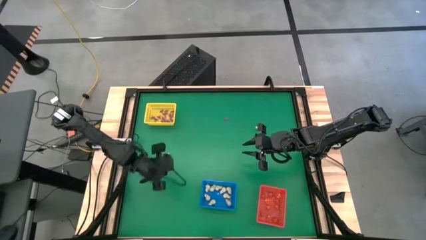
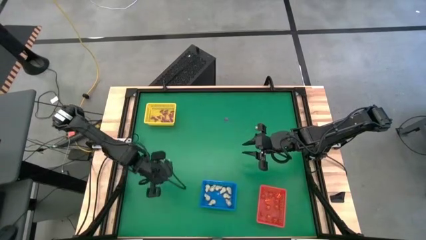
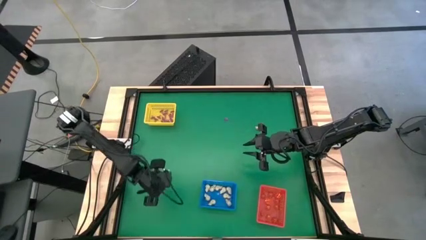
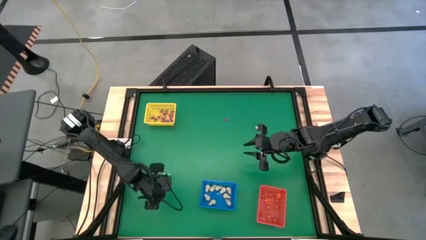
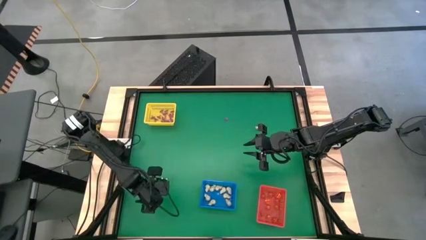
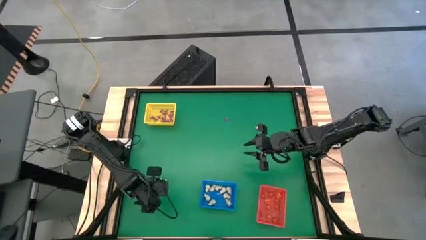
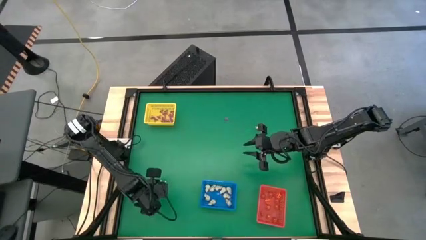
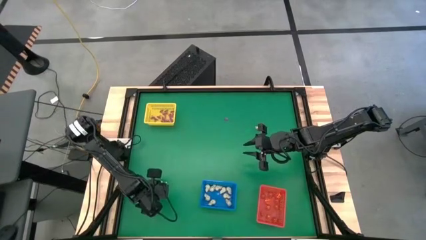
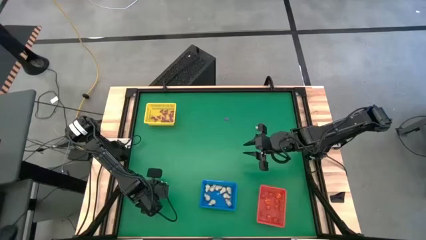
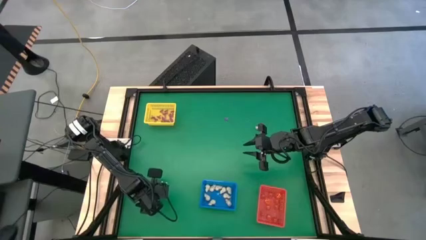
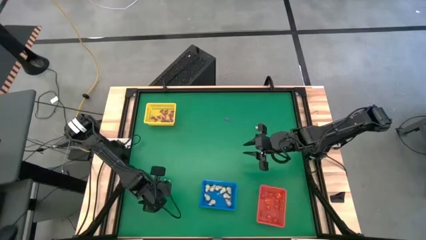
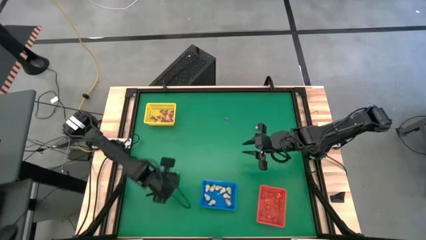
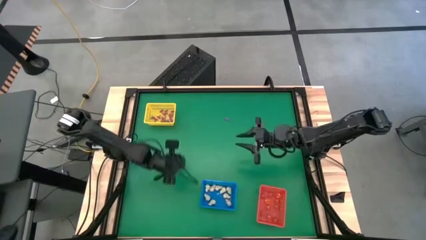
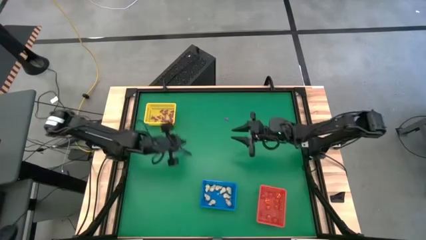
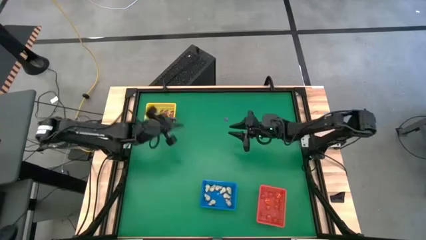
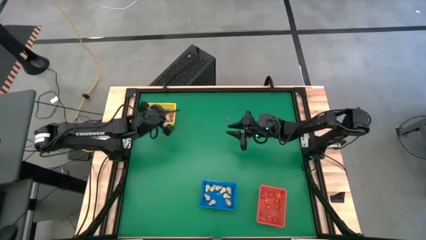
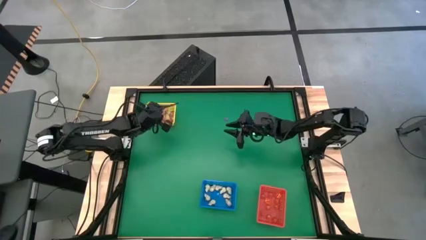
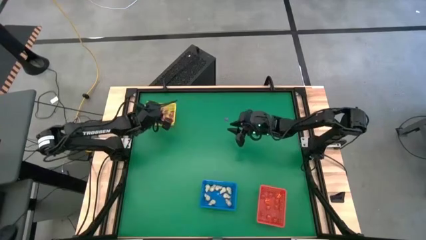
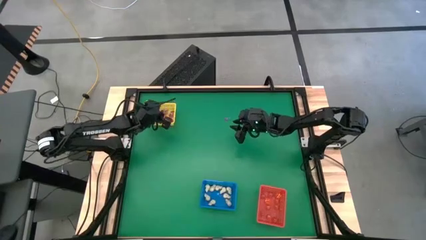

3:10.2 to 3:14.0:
Task: Sort Halloween decoration
Put the purple witch hat toy into the yellow basket

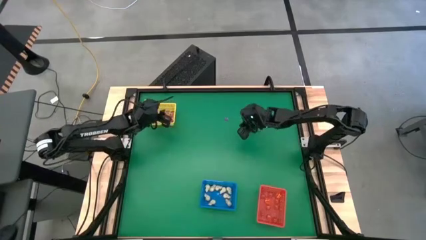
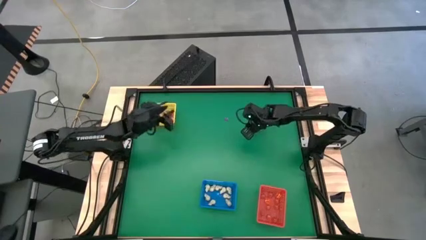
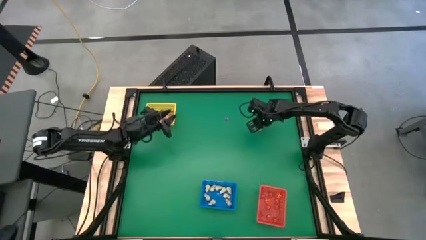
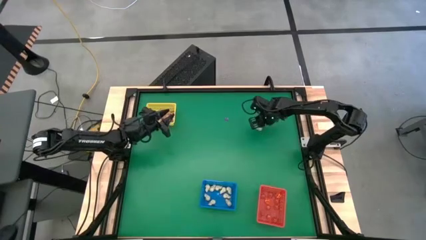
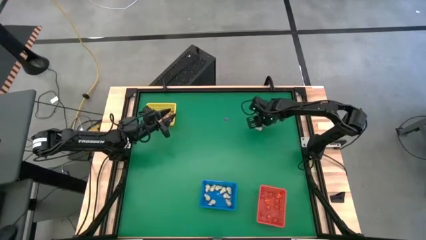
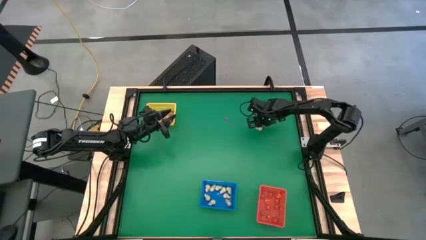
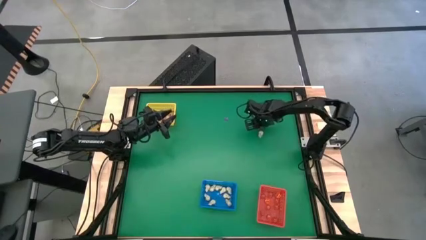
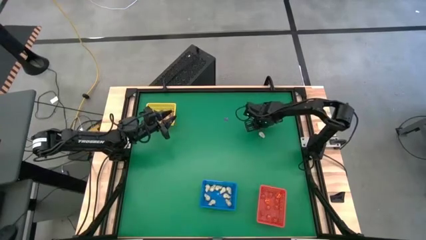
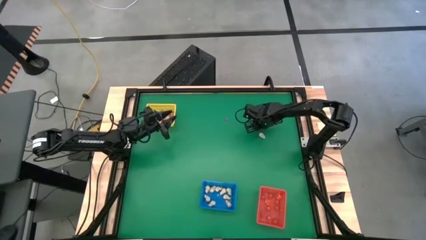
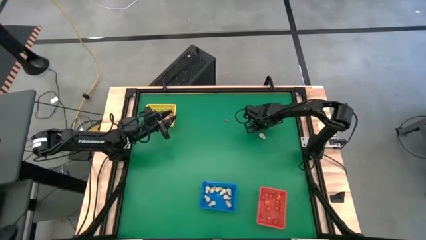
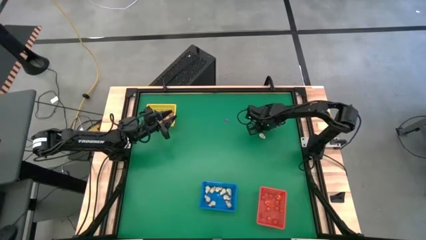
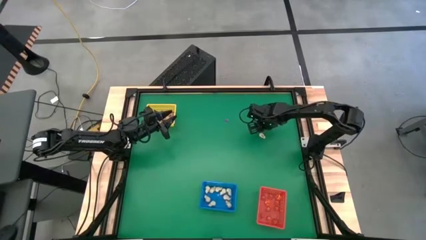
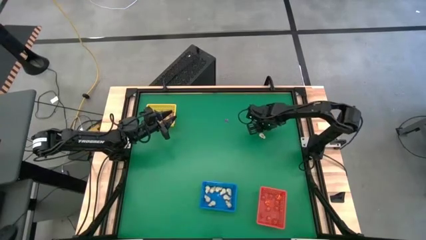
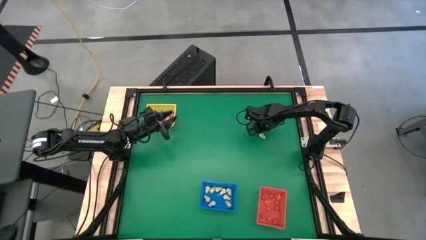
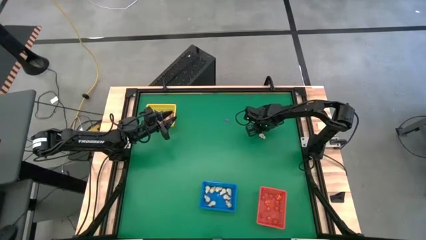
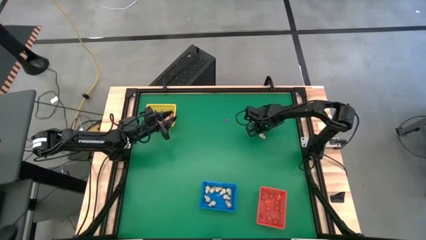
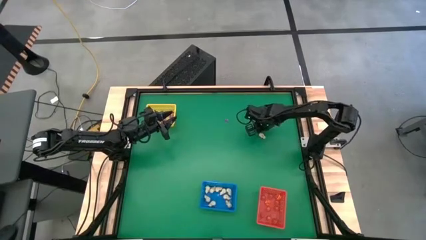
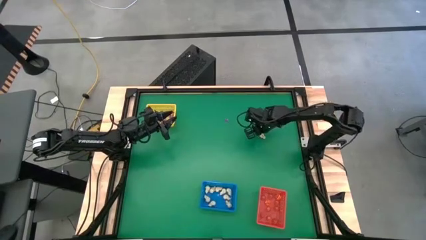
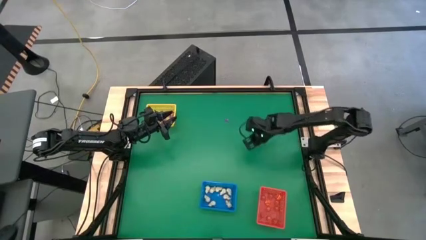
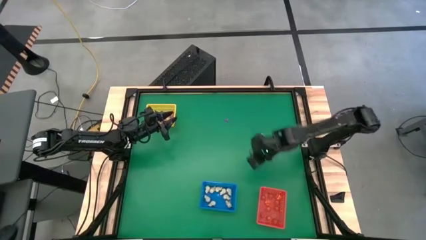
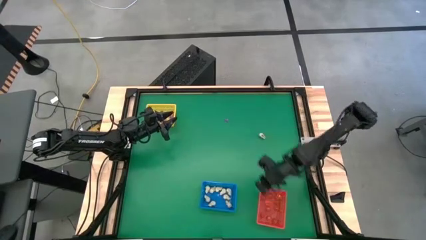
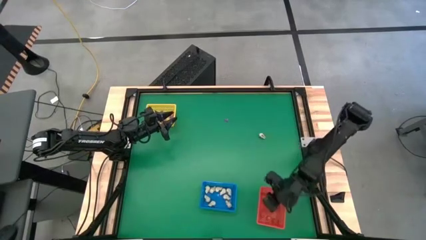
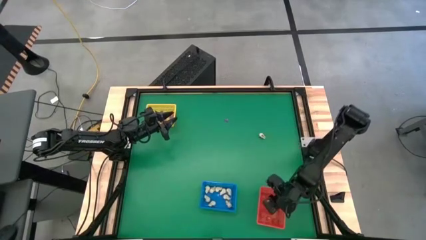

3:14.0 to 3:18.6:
Put the orange pumpkin toy into the orange basket

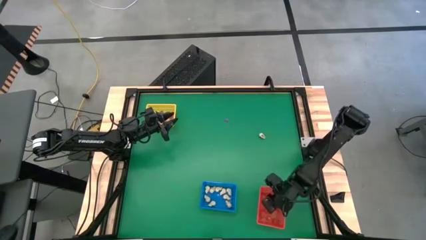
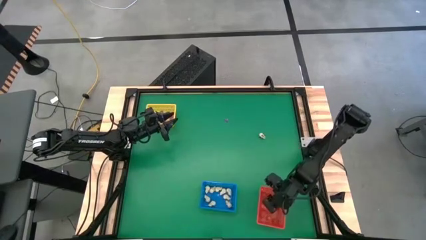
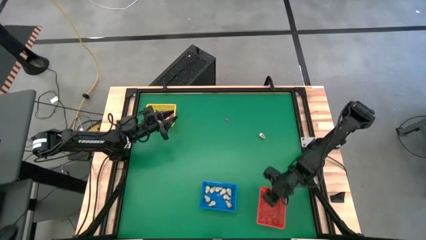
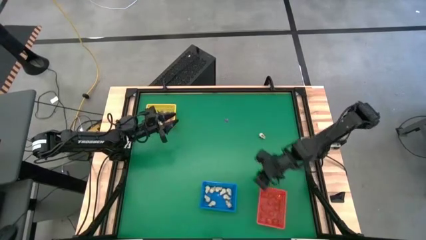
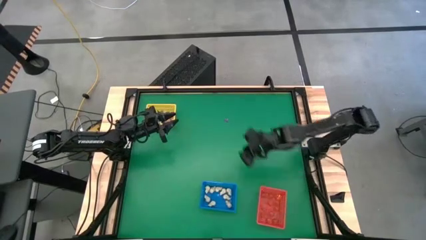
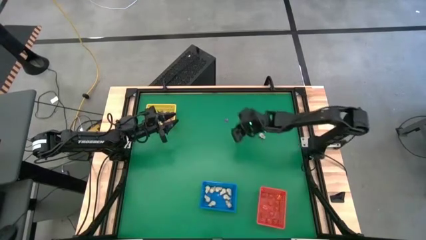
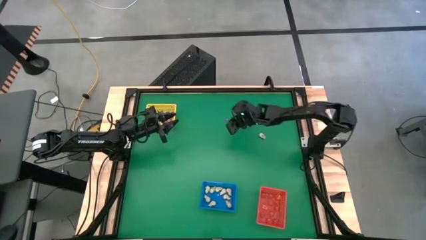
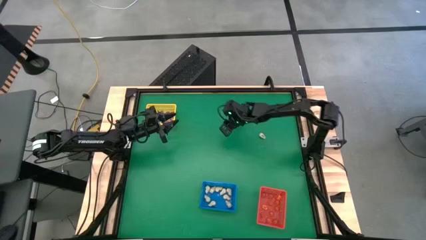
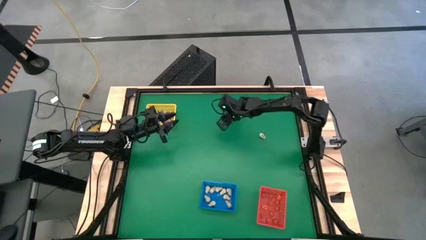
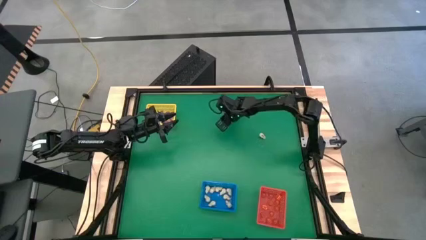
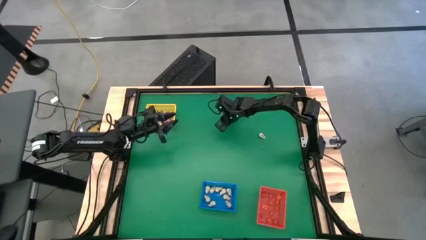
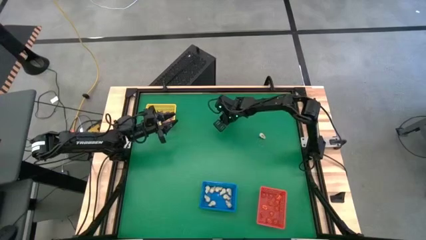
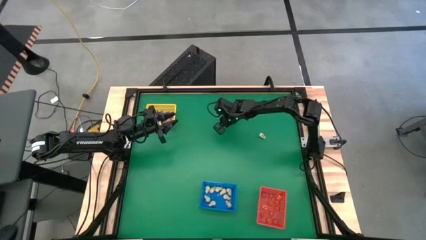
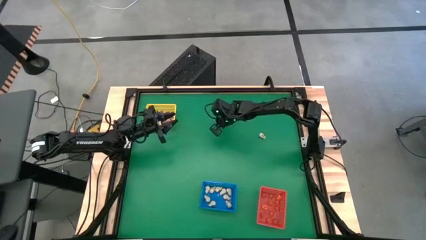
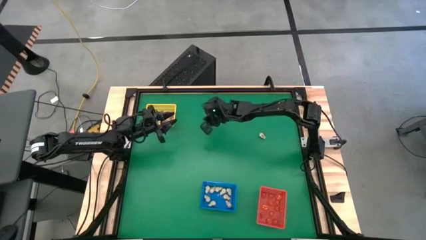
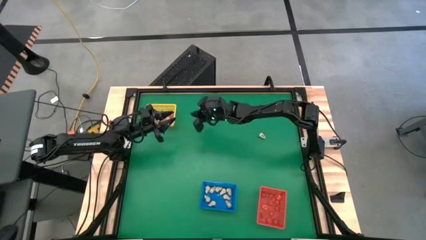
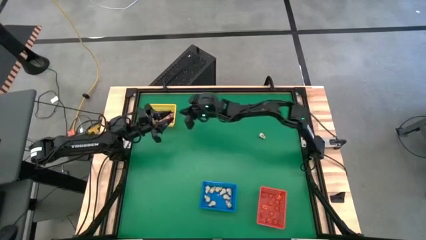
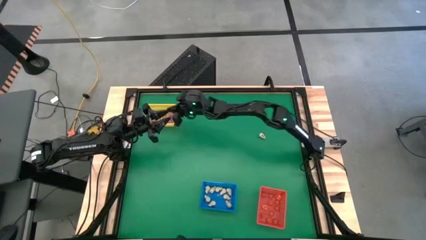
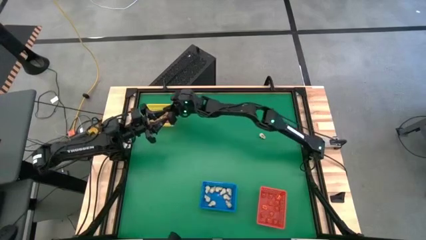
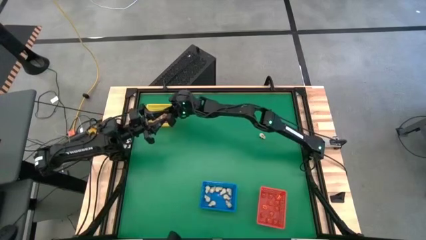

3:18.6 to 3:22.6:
Put the purple witch hat toy into the yellow basket

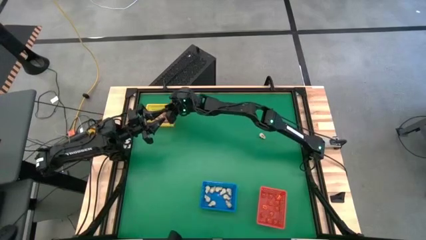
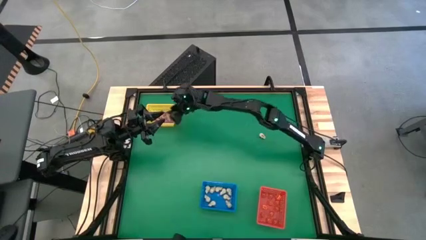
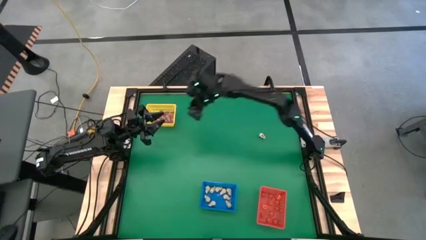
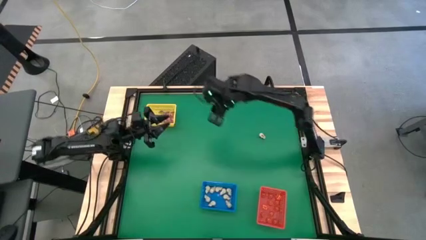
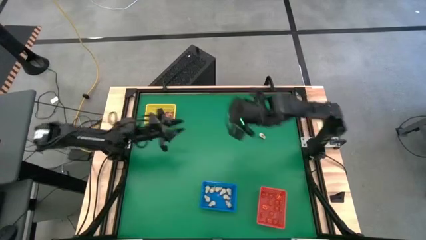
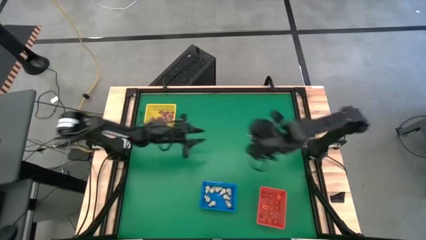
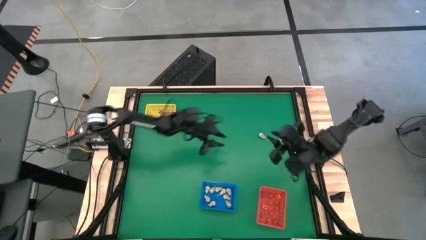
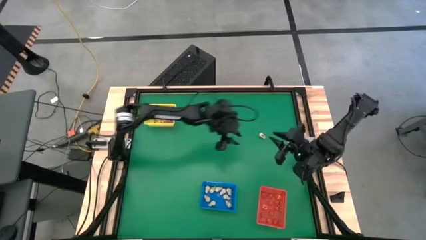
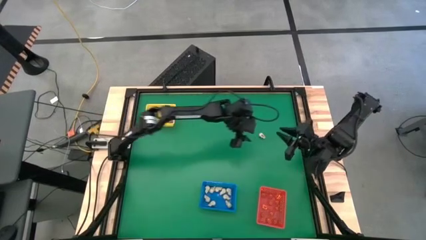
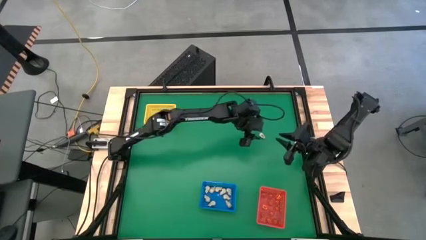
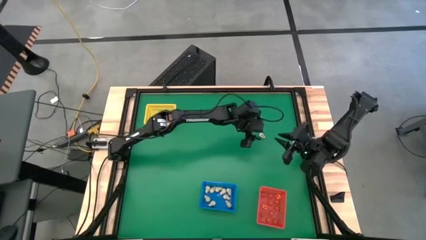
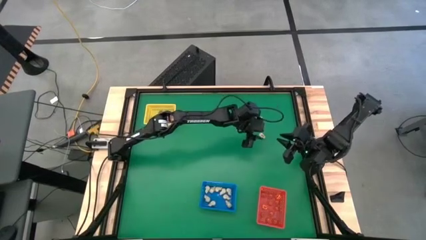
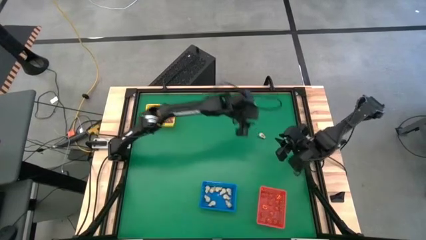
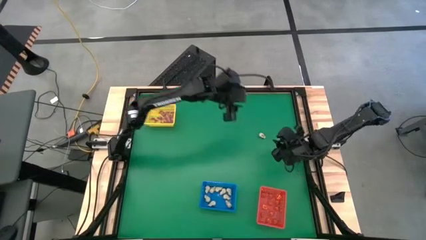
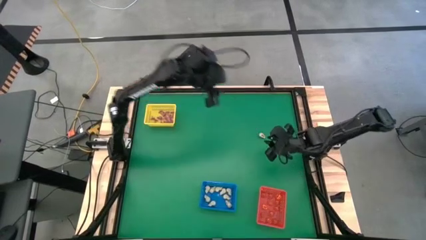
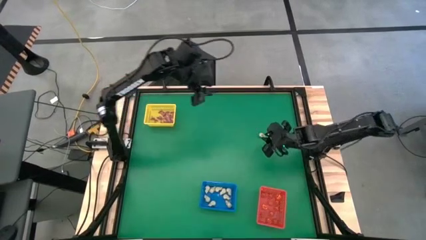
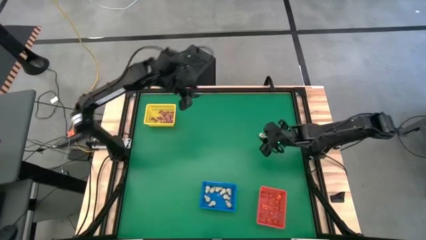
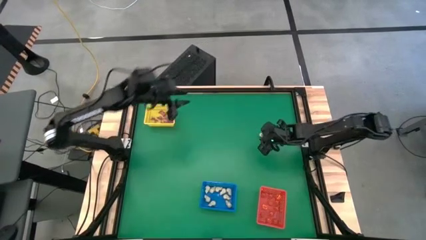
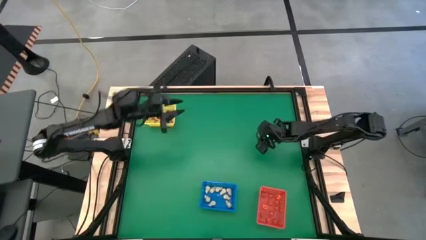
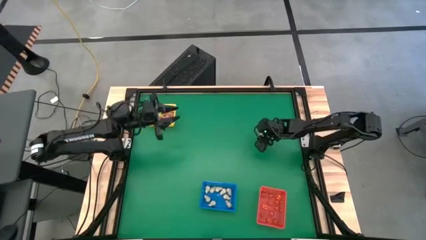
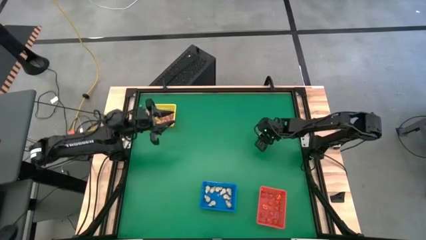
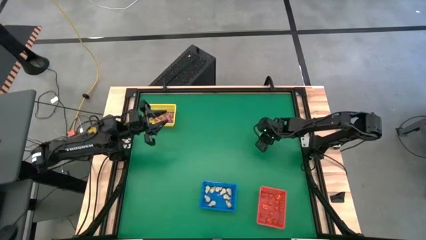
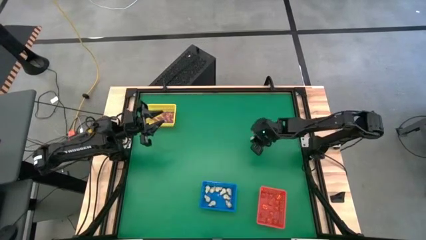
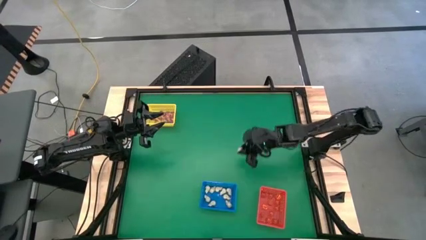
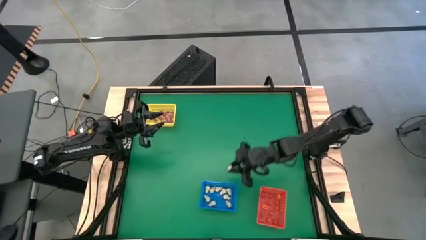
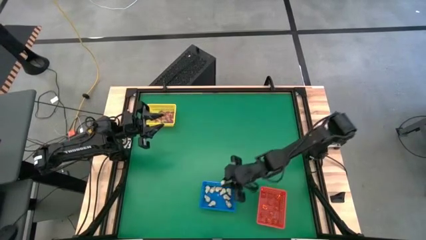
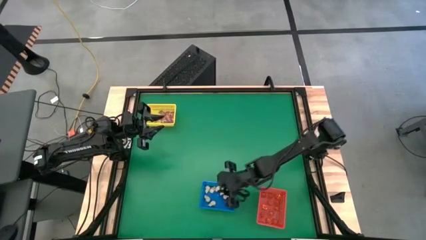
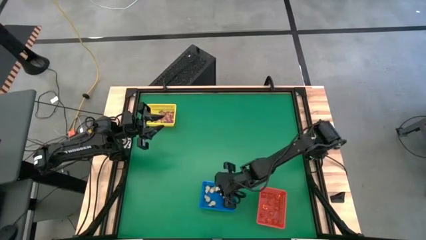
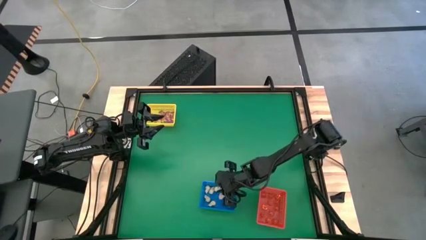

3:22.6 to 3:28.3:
Put the white skull toy into the blue basket
